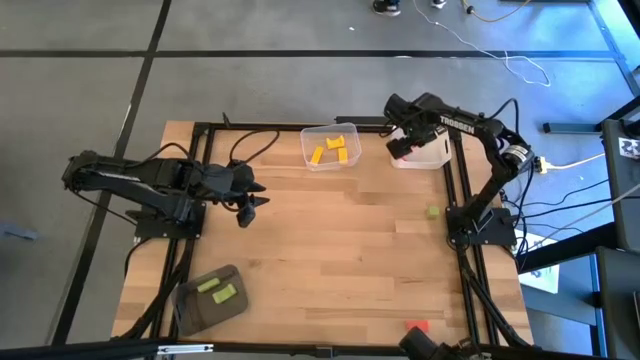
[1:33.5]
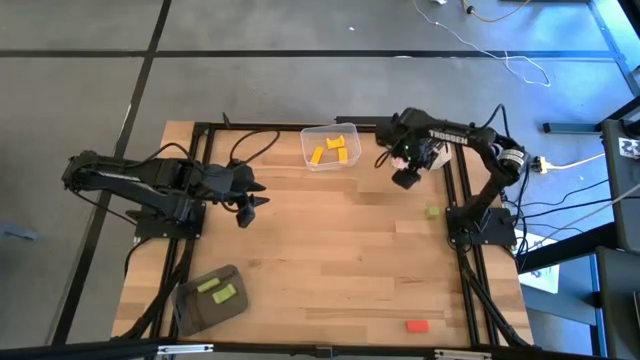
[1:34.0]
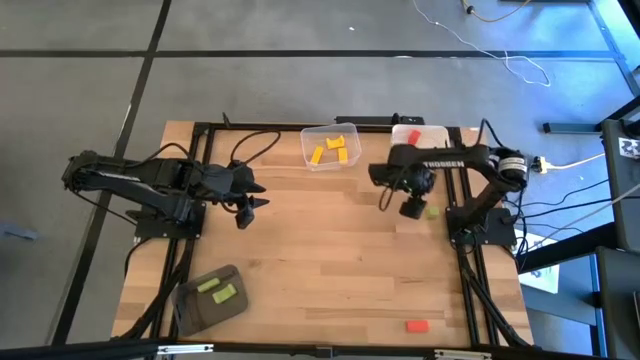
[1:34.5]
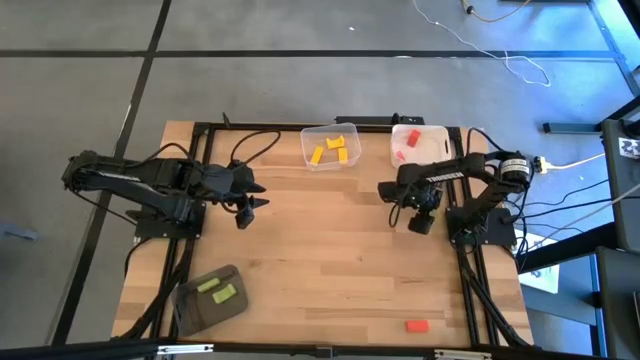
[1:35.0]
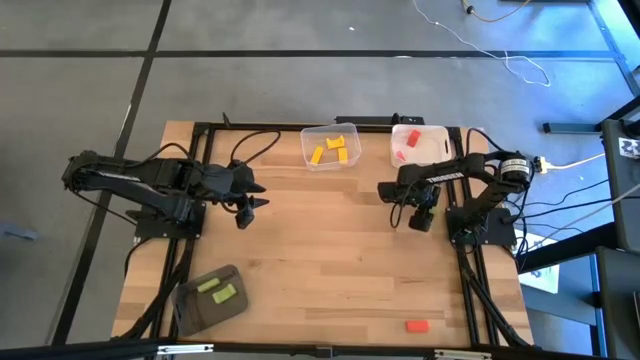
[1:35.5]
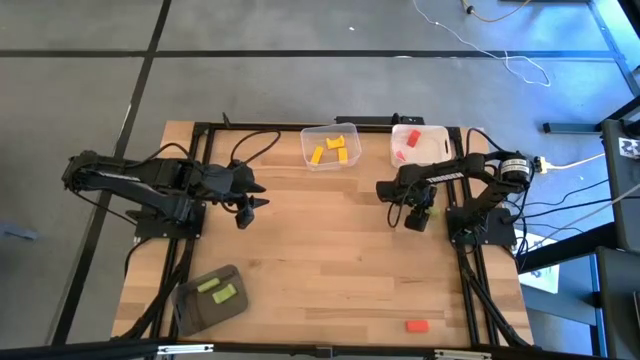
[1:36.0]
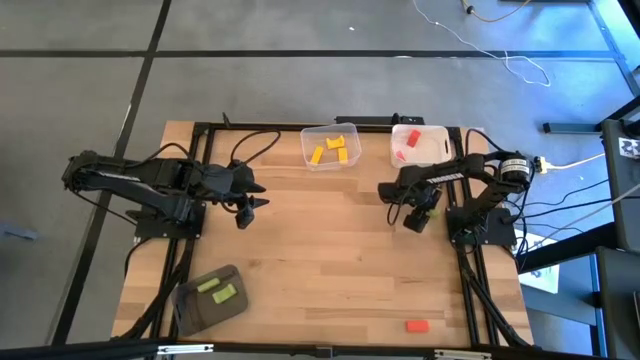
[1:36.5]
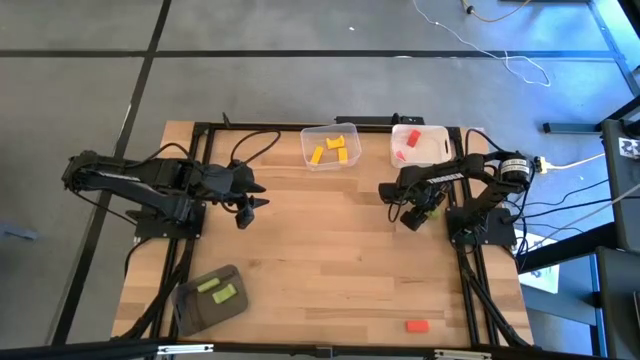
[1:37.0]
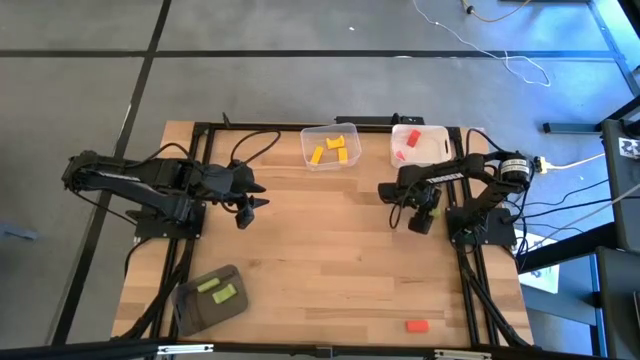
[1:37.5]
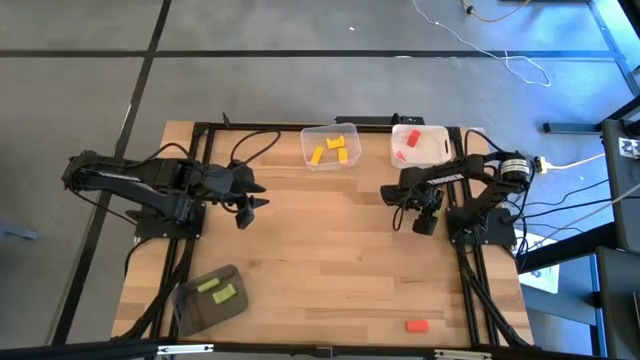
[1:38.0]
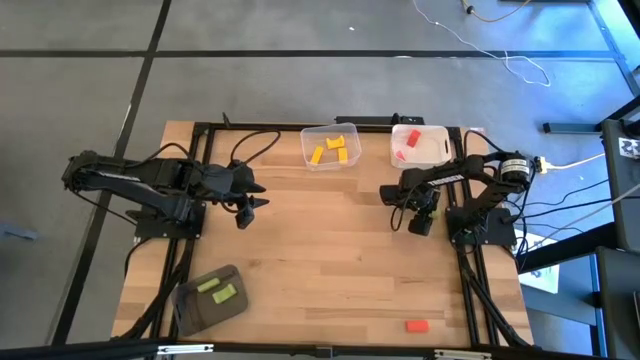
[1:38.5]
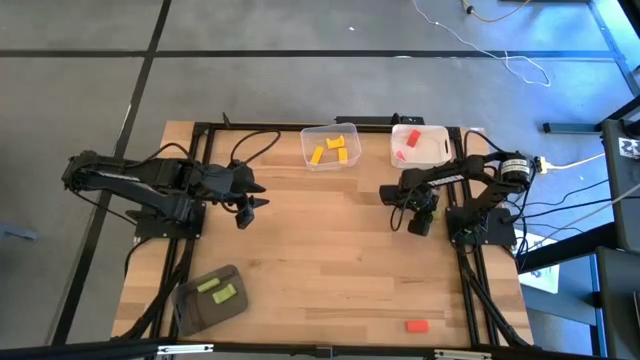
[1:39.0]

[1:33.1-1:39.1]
Task: Sort & place blocks by color
Put the green block into the black bin

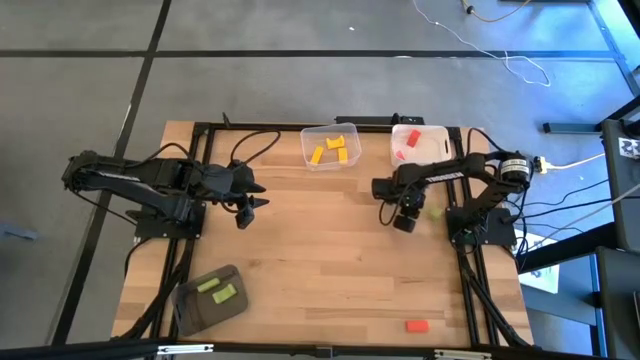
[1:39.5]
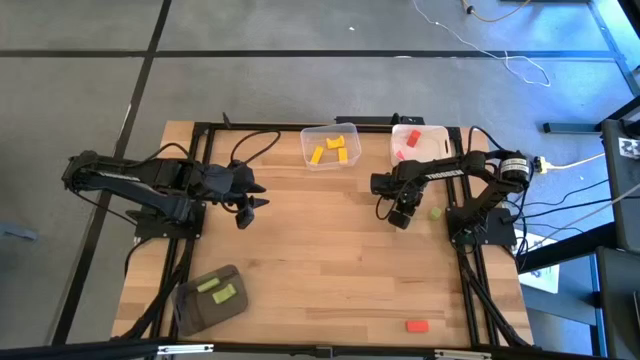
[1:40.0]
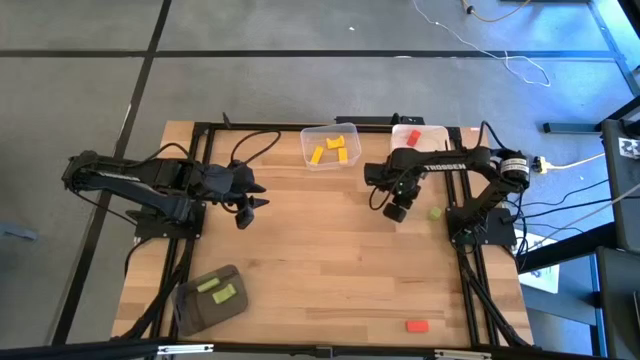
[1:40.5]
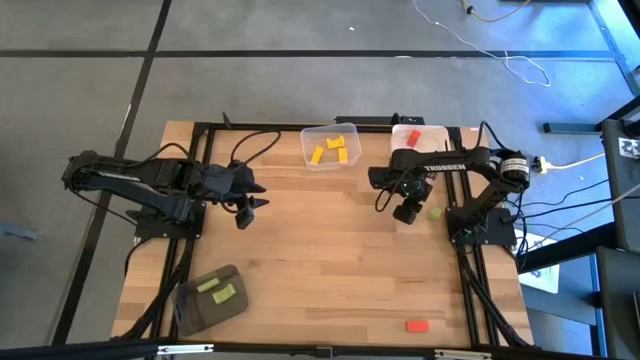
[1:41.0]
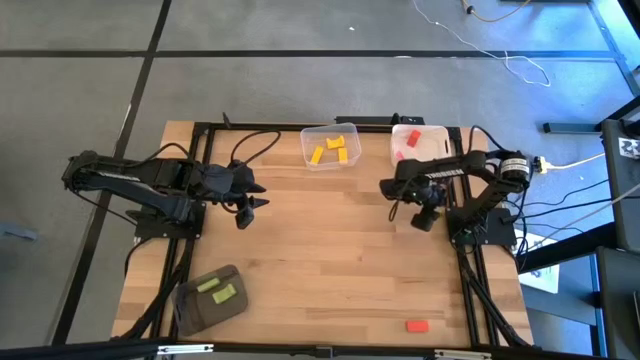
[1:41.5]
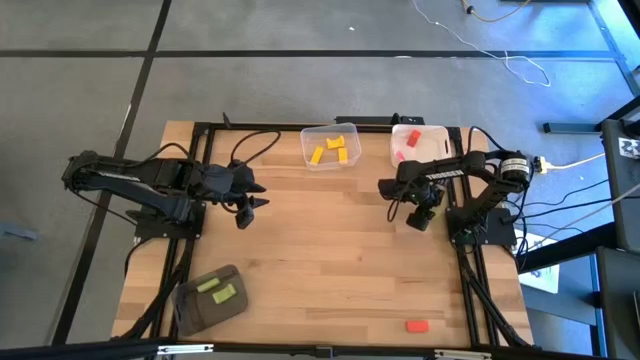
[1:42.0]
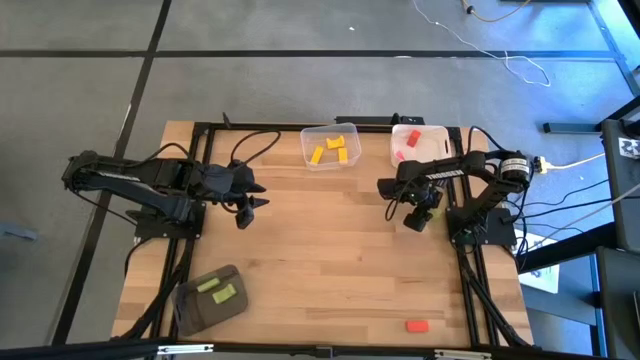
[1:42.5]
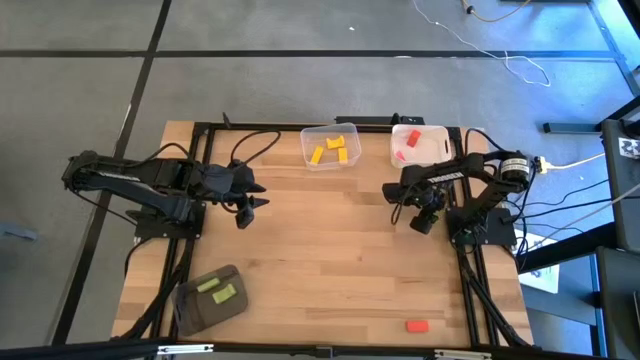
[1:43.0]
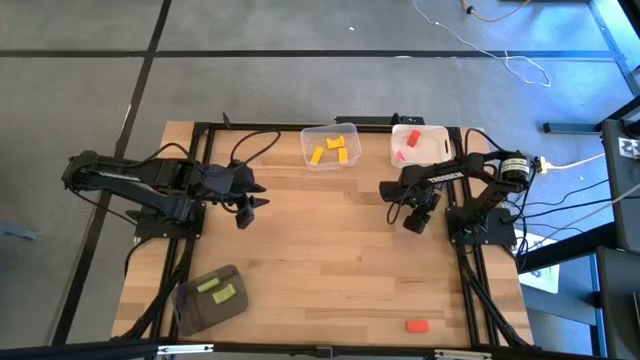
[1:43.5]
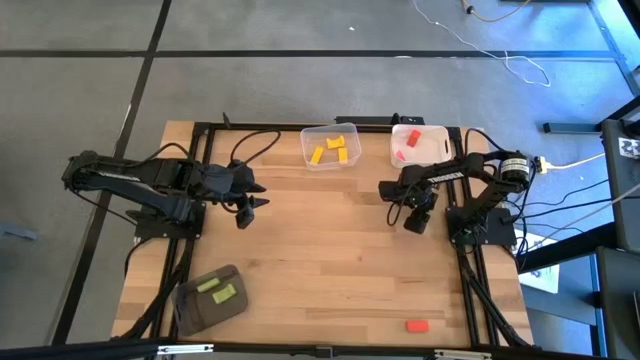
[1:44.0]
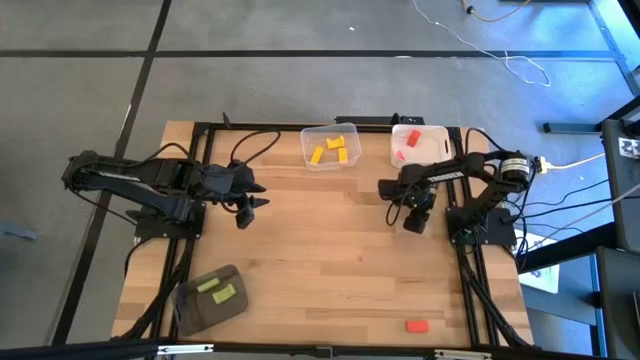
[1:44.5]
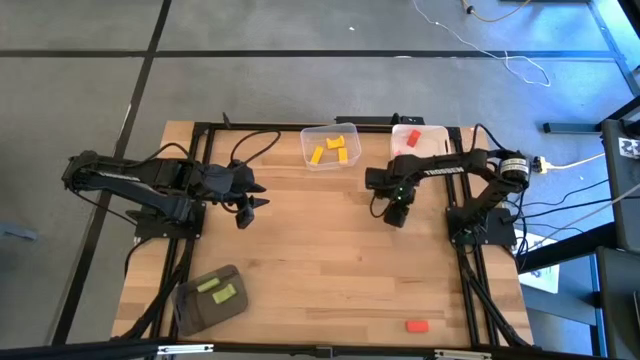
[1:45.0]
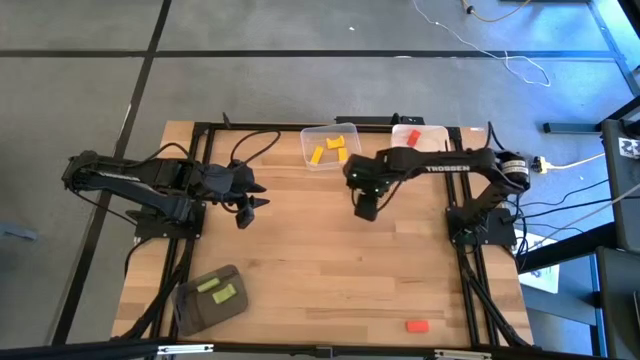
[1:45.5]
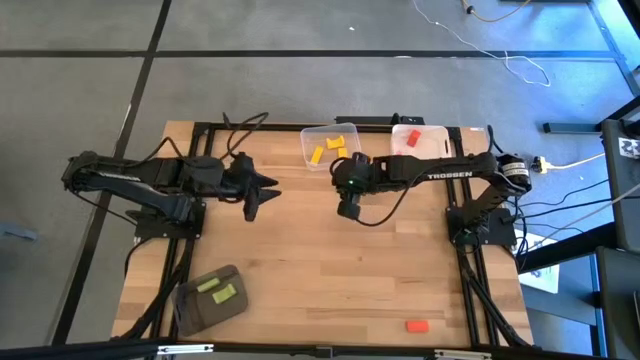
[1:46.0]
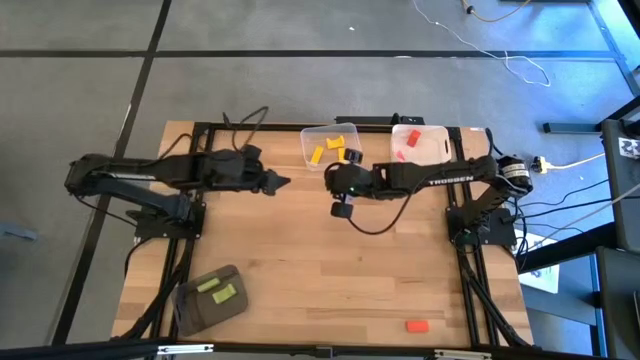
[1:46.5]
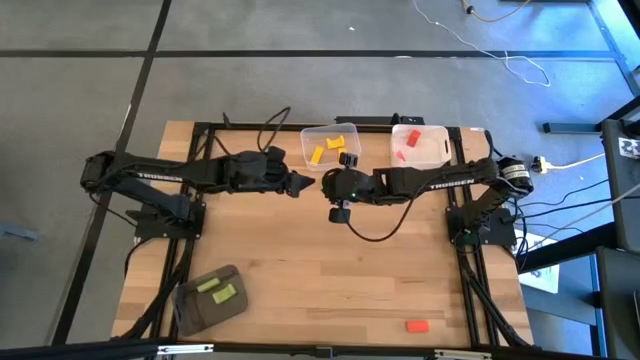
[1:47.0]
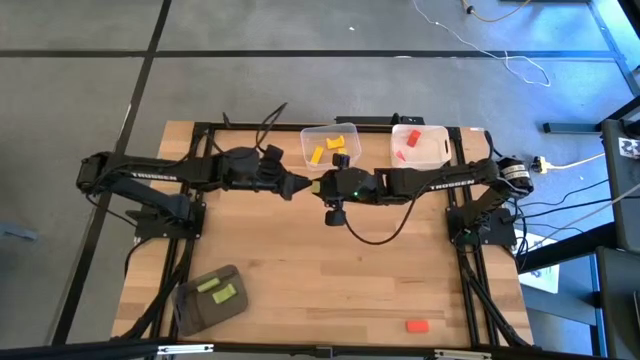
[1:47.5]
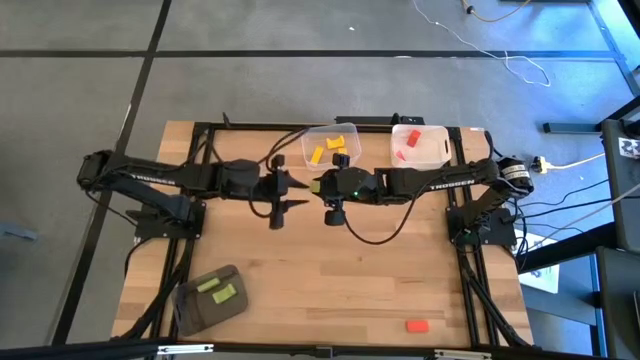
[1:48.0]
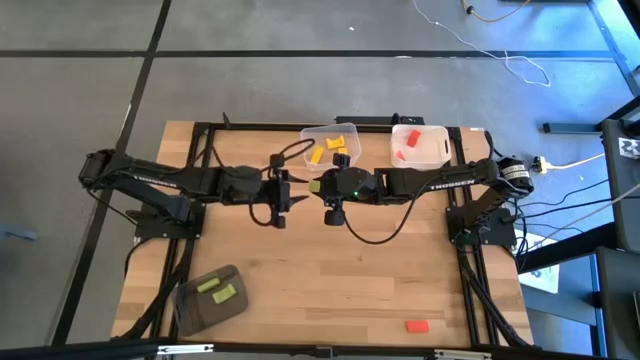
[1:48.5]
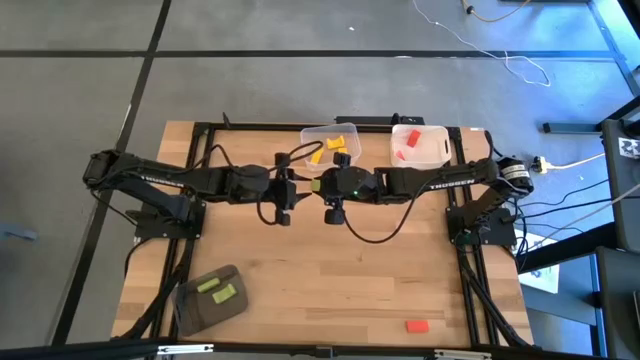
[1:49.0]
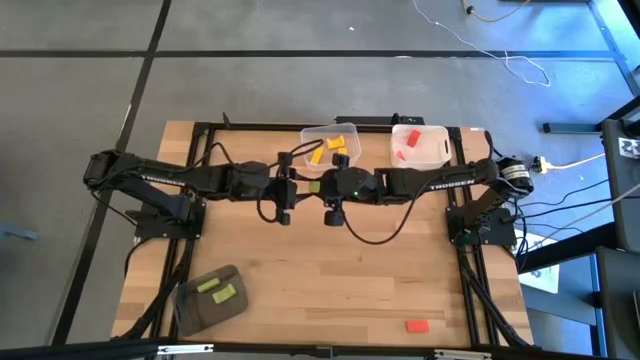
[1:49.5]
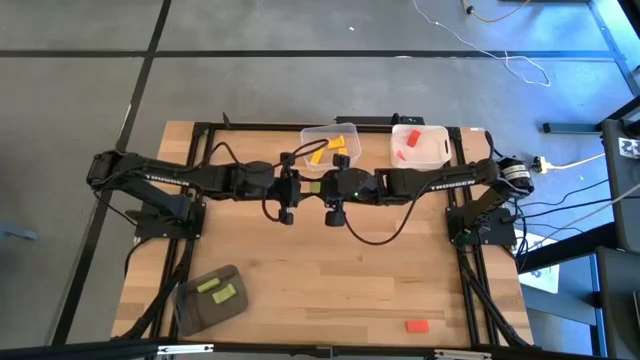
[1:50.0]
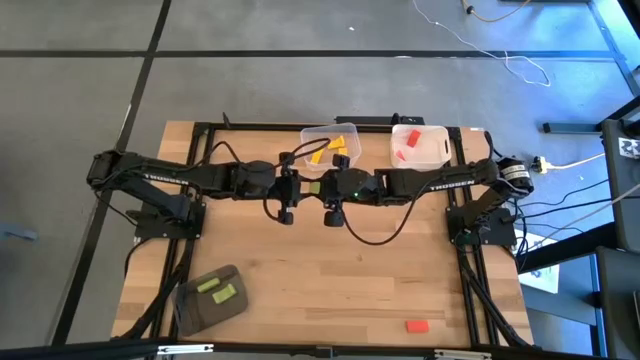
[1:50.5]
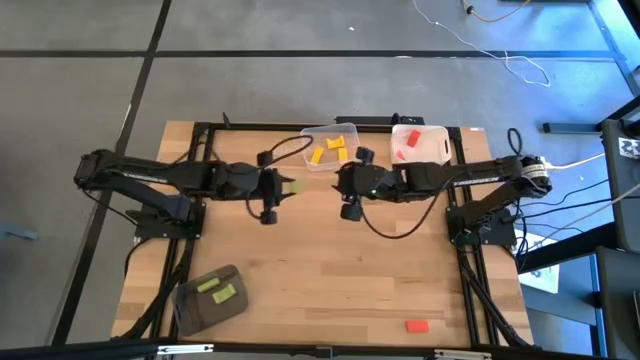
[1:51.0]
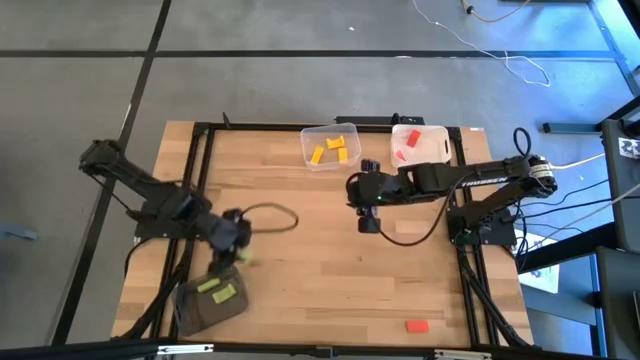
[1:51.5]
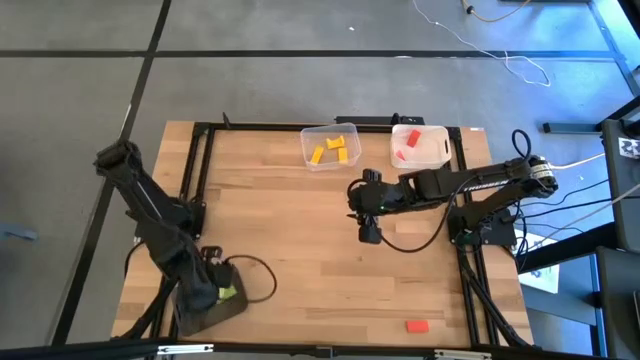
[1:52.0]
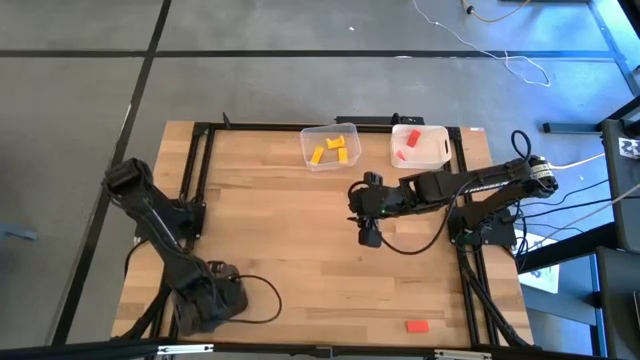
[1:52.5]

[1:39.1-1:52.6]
Put the green block into the black bin

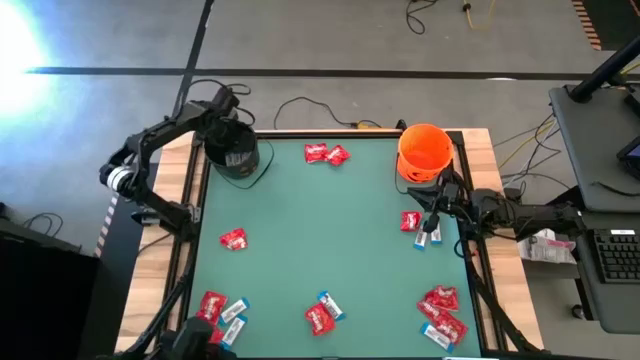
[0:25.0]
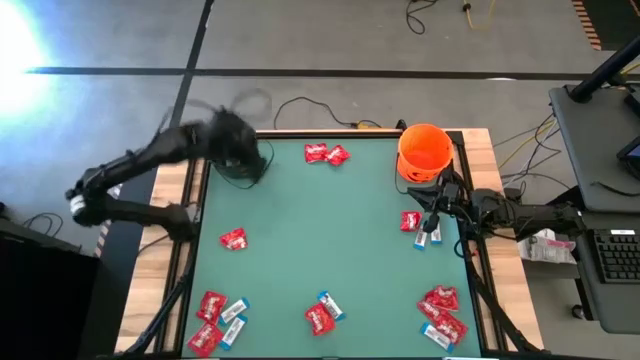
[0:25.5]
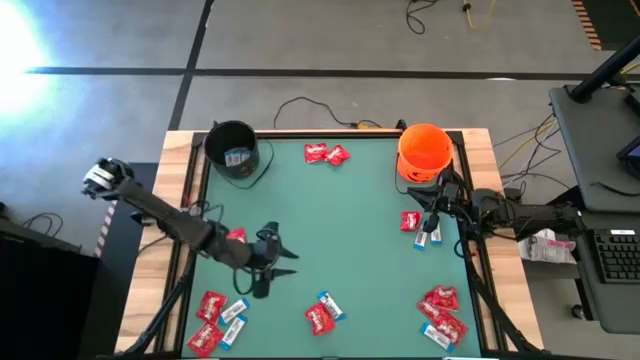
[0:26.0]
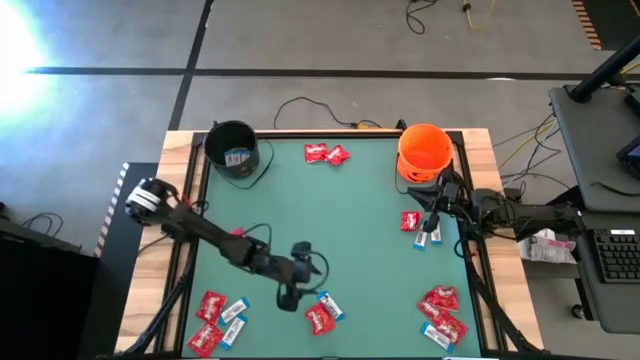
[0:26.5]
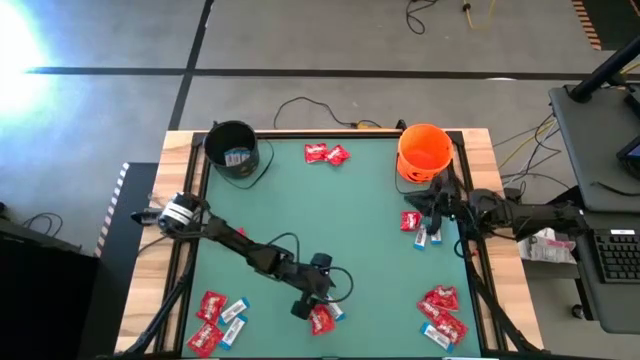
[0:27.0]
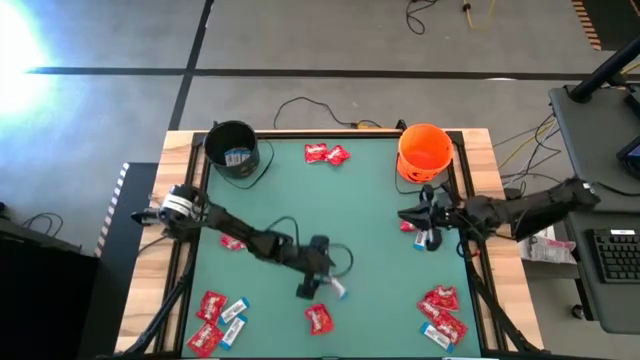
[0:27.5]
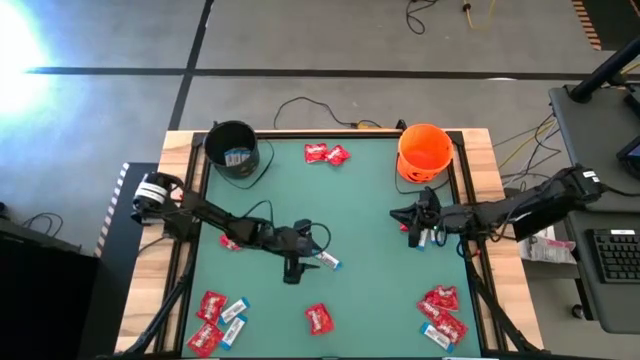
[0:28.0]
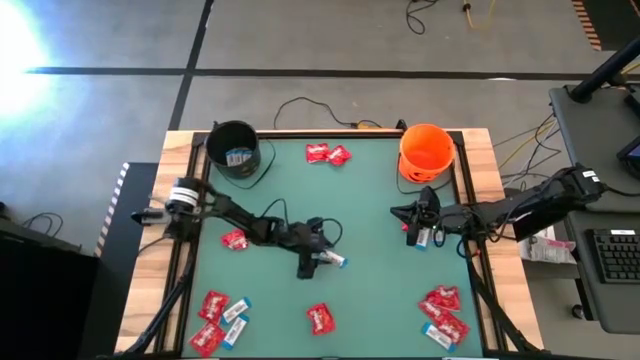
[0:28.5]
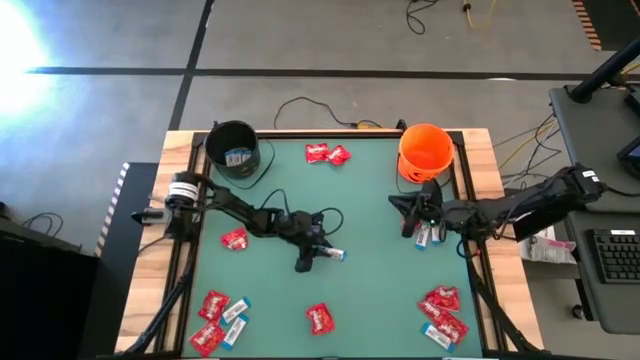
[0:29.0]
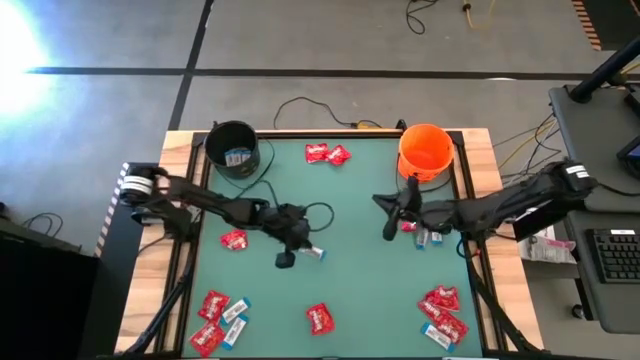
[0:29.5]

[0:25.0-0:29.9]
Task: Sort candy by brand, put in halloween buckets
Put the white chocolate into the black bucket
